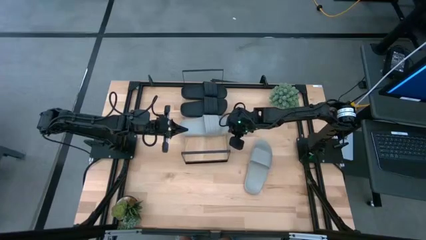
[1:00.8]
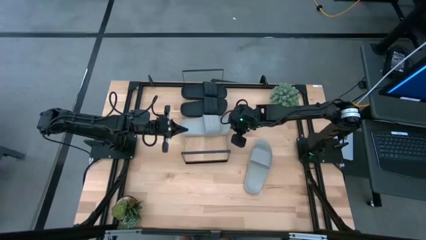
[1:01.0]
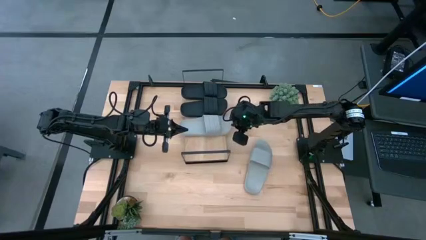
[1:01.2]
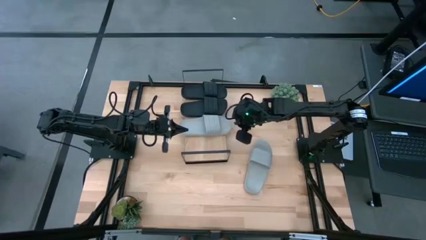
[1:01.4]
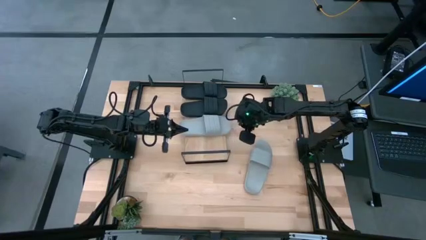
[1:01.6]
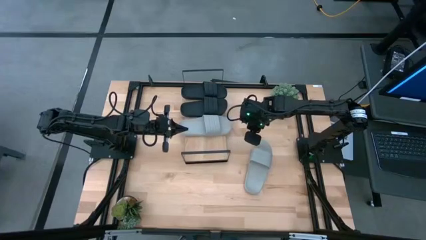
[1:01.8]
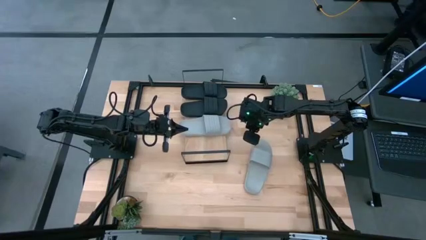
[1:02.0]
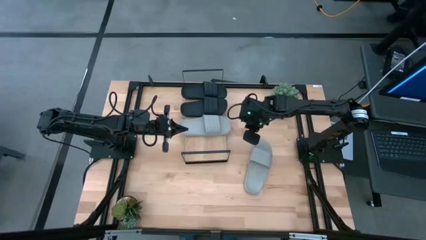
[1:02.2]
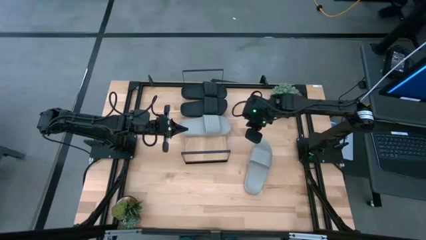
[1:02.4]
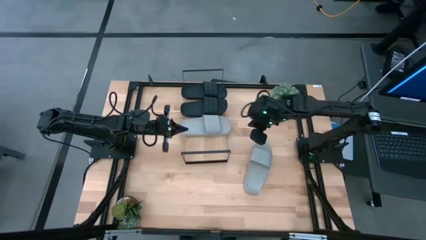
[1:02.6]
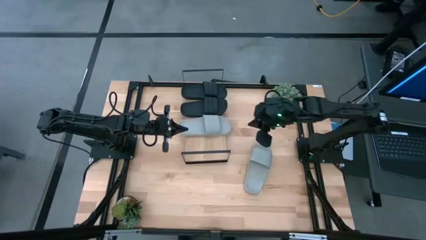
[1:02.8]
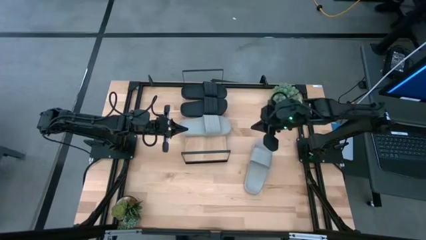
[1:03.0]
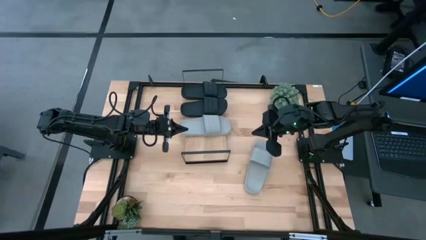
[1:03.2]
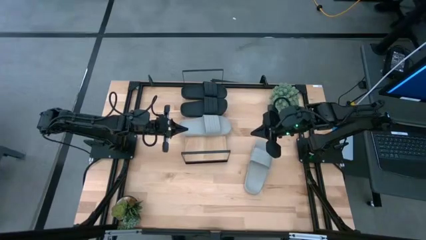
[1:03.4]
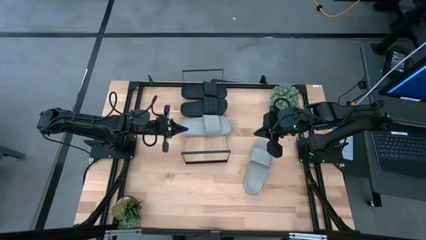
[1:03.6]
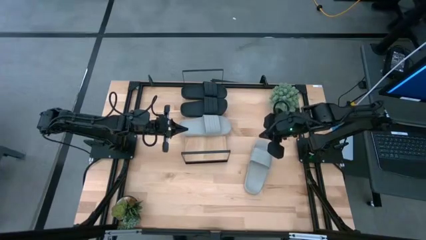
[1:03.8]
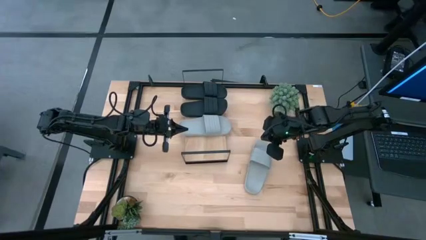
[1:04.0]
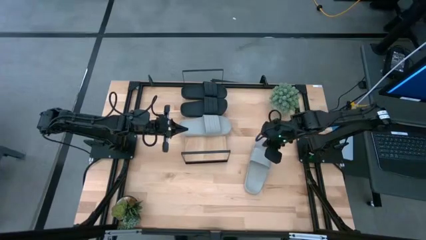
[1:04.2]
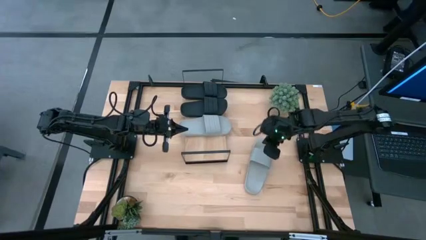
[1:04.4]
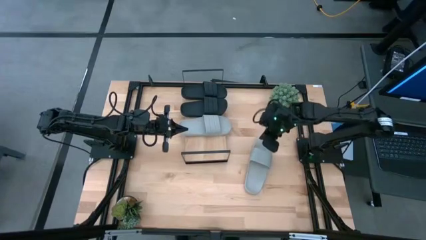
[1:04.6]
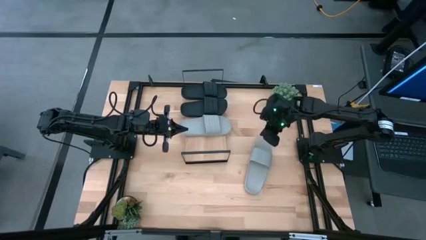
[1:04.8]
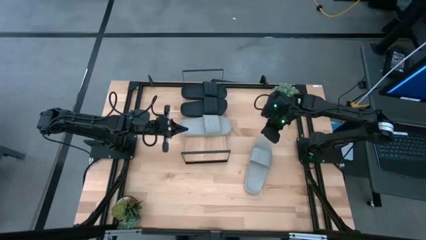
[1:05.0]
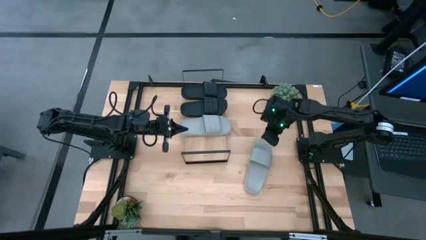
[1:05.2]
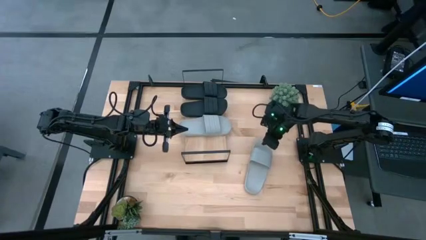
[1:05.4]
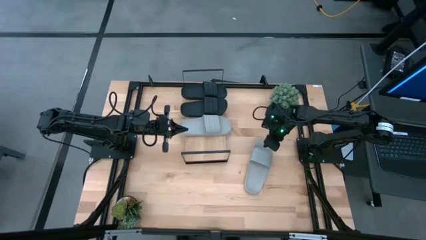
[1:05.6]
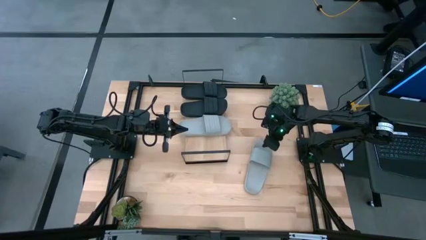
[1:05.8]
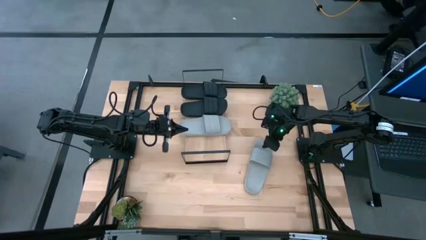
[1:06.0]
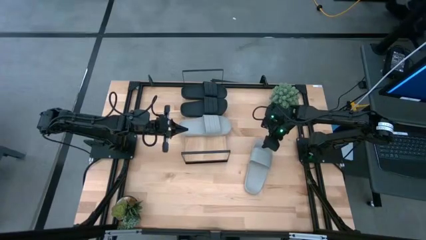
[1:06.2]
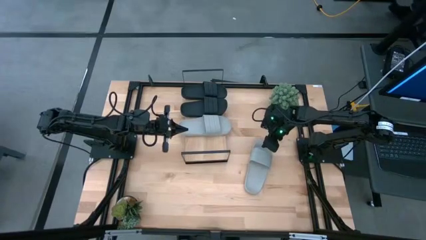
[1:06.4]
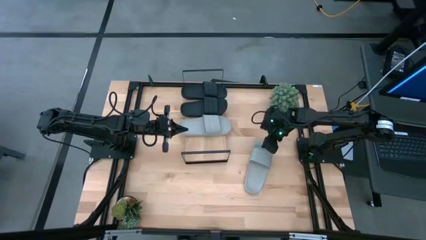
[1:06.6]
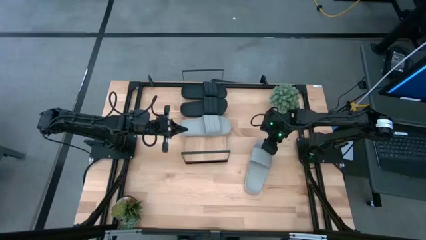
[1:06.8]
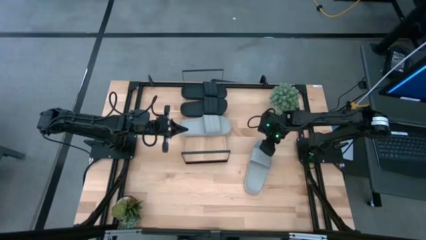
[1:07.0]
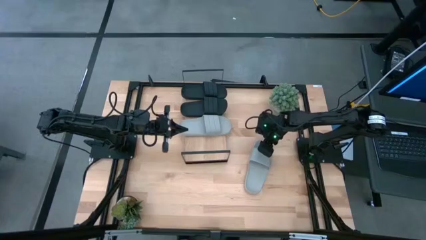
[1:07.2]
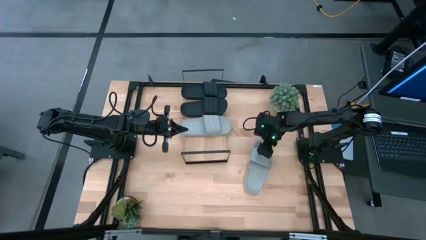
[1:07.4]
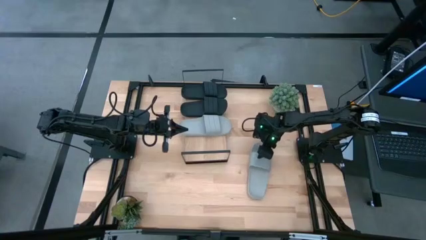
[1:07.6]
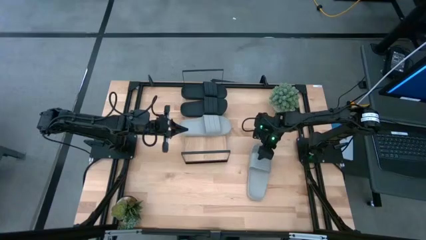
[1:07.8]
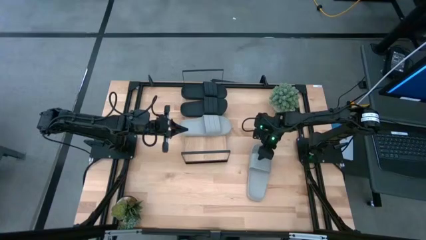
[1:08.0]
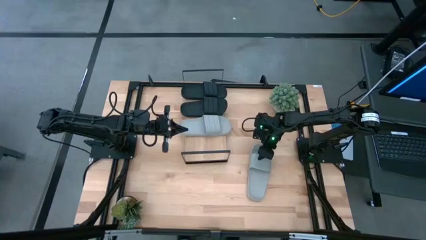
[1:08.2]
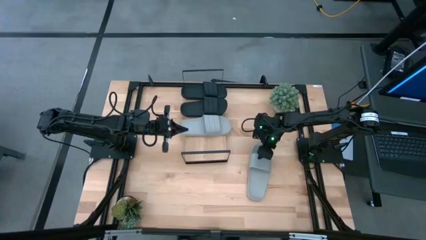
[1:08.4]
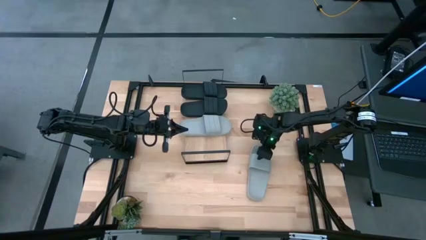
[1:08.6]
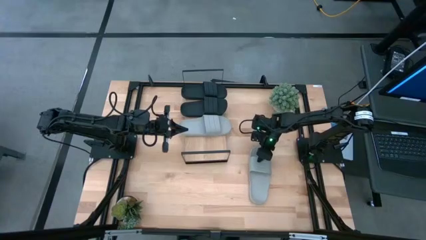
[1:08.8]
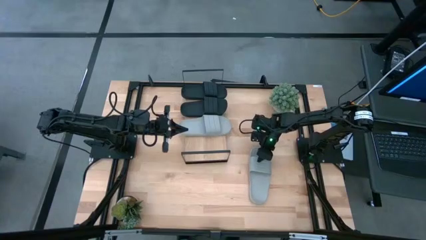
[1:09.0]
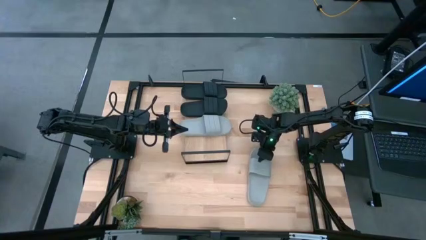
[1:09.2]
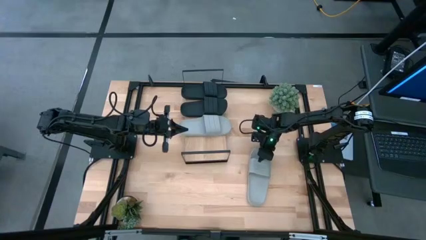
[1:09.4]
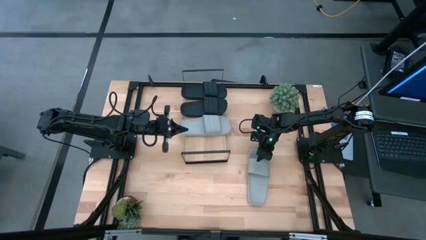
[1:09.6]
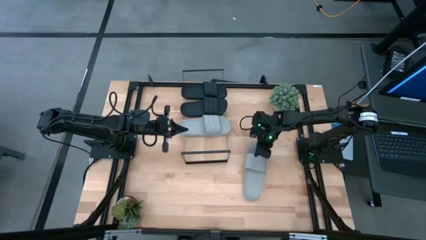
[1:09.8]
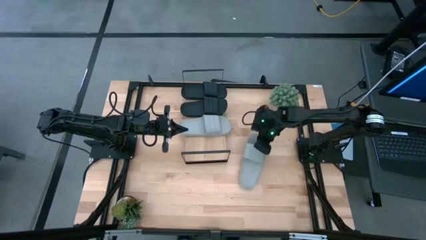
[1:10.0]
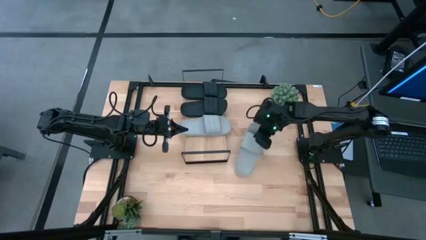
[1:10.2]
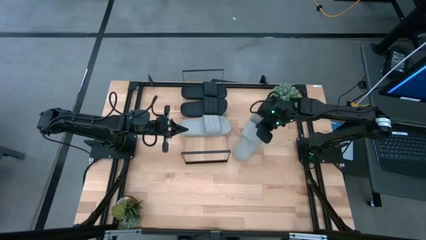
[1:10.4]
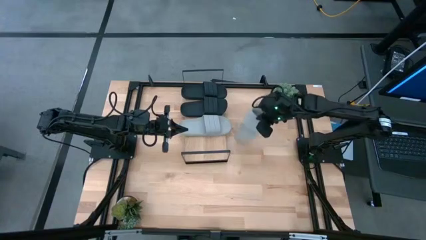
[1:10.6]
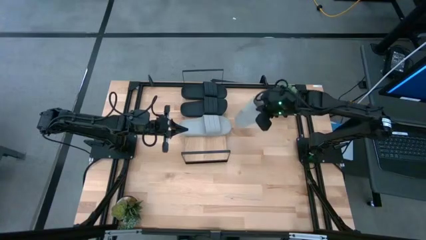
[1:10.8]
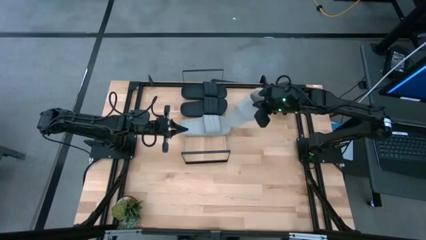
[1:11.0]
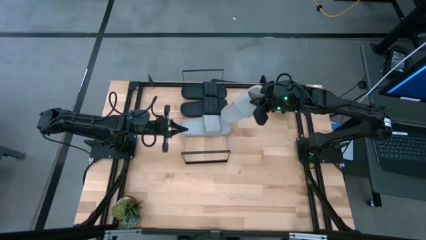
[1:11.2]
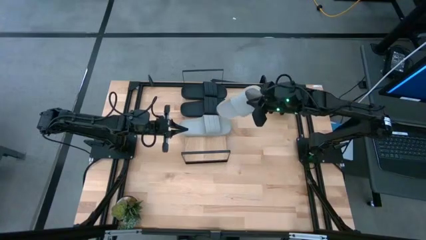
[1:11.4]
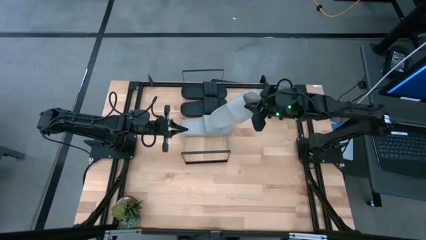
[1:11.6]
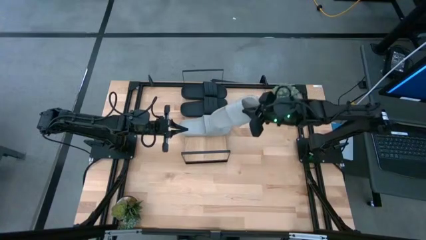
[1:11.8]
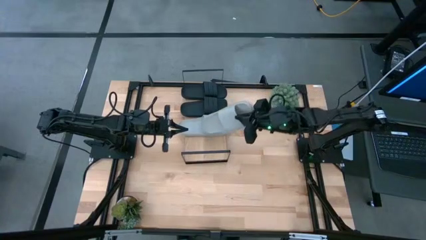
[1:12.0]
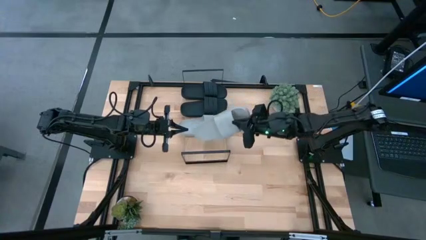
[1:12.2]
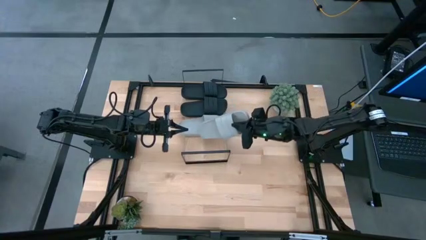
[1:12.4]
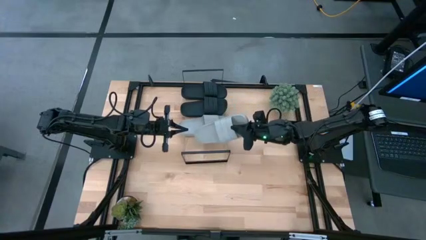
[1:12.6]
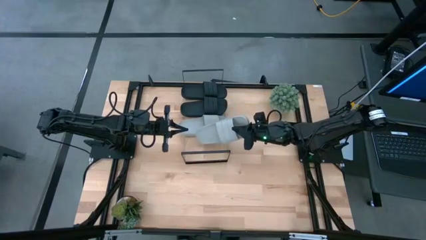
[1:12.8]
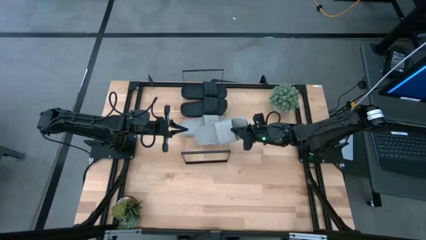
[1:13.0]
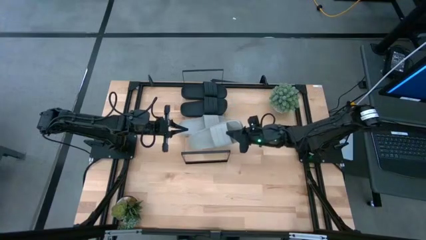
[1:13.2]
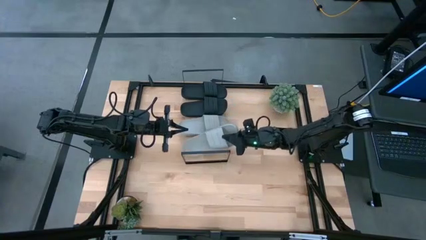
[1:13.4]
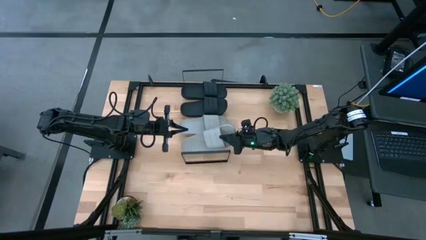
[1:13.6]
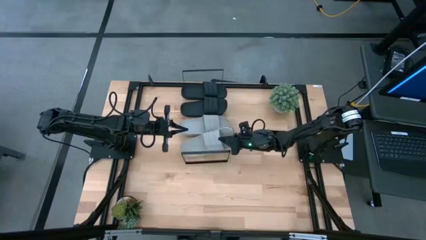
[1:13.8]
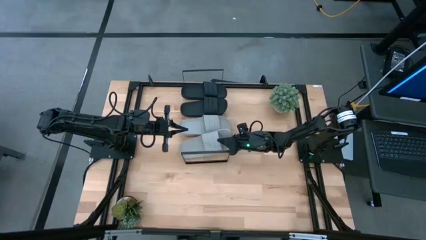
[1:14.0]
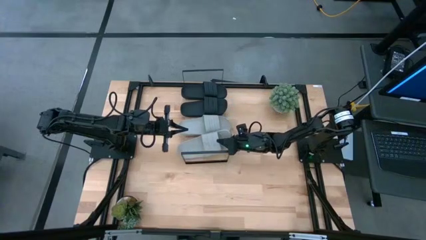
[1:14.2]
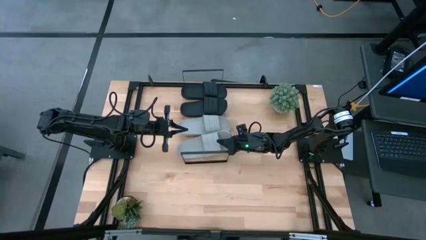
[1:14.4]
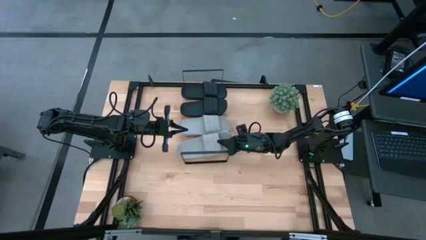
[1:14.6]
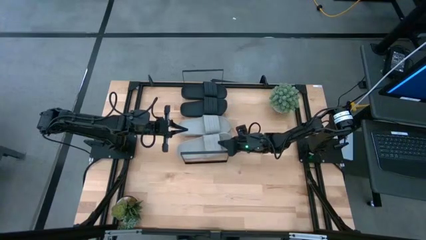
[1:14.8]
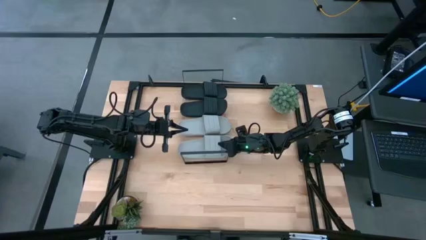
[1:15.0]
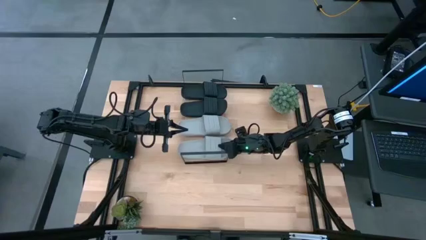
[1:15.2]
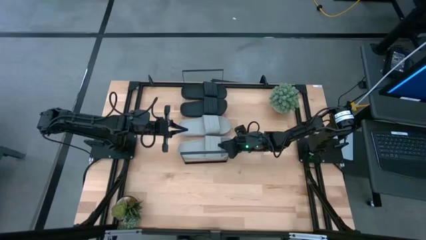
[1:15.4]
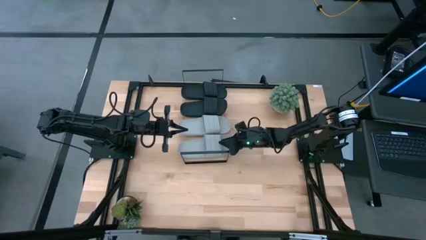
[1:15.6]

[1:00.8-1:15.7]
Task: Pick and place slides into the shelf
Put the gray slides on the shelf

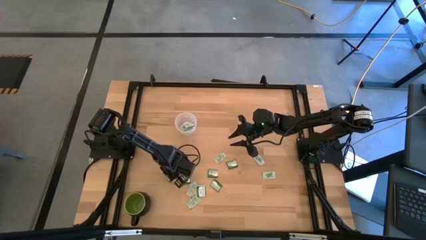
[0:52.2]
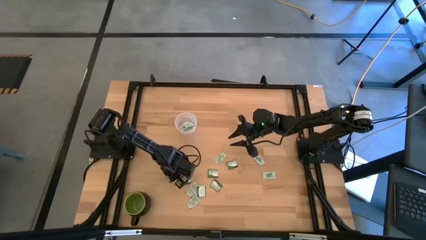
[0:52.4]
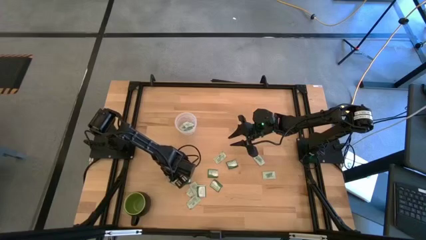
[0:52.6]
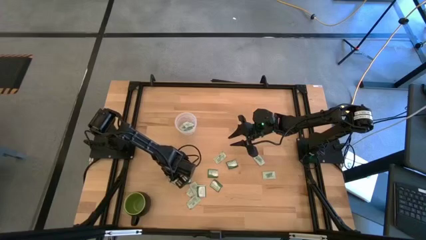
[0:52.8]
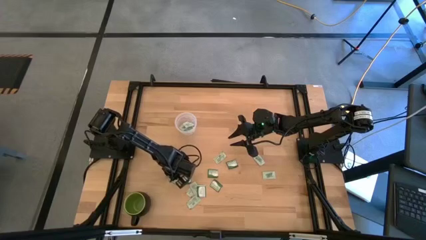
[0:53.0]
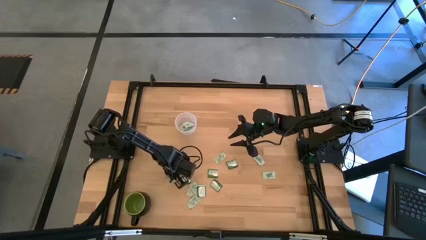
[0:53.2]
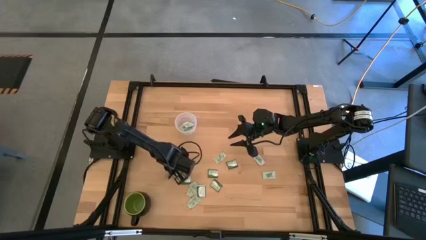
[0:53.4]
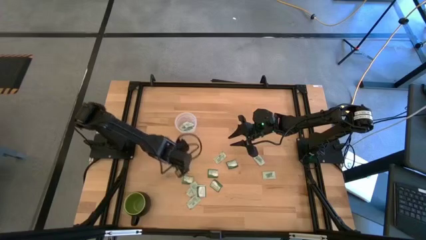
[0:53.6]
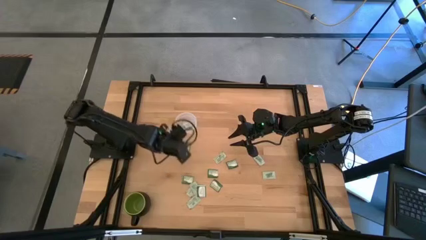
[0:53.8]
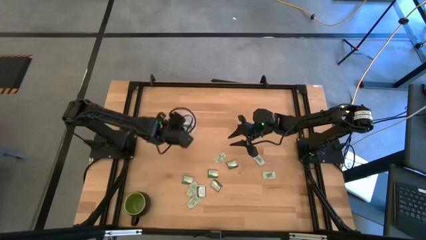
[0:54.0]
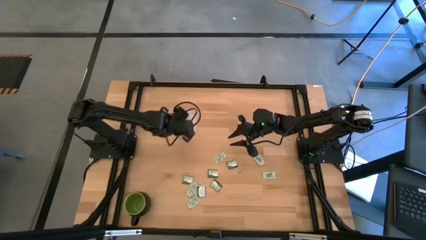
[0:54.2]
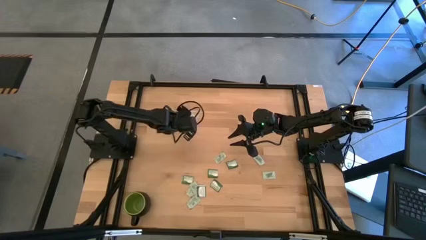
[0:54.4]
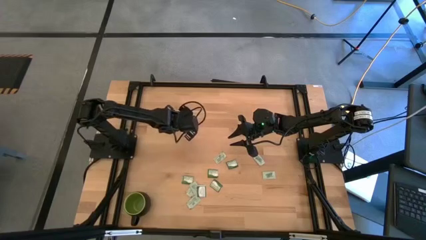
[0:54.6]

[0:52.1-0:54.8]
Task: Pick and place Stevia / Truvia into bins
Put the green stevia packet into the transparent container
